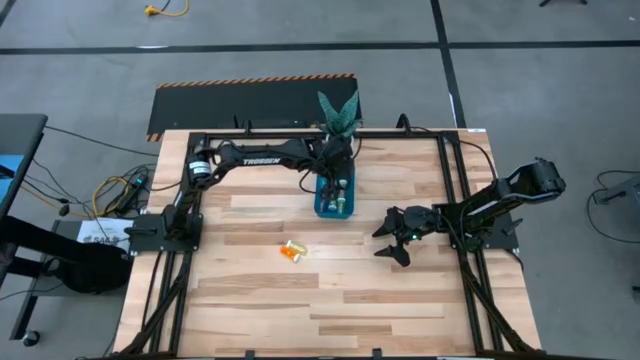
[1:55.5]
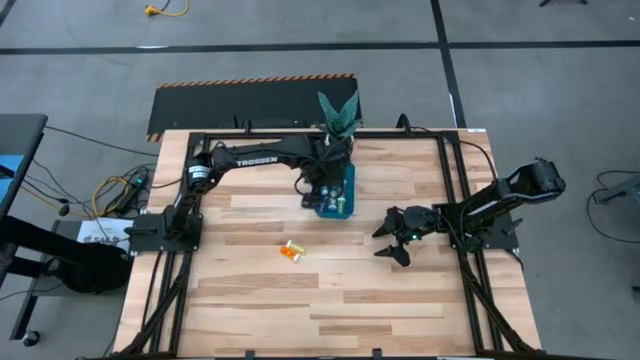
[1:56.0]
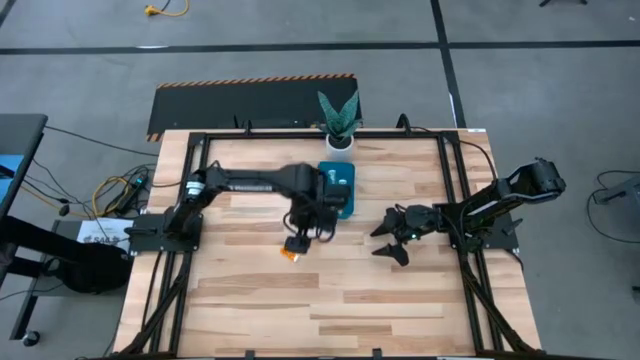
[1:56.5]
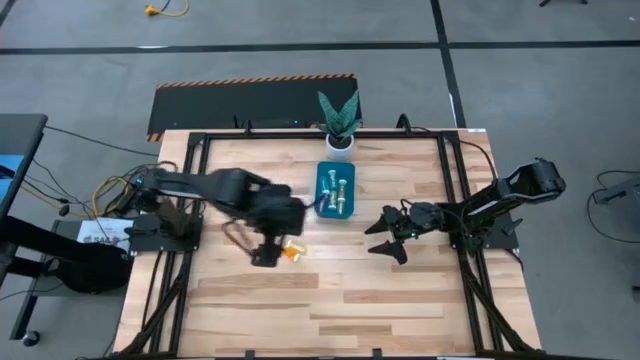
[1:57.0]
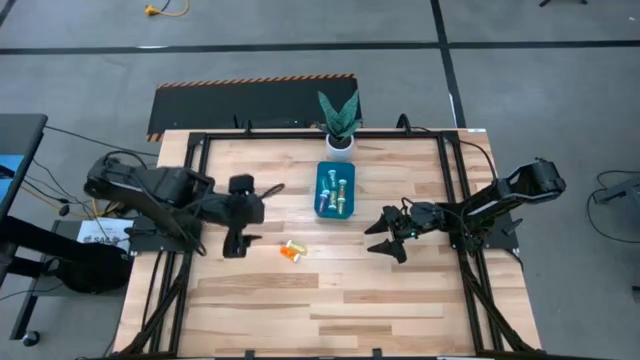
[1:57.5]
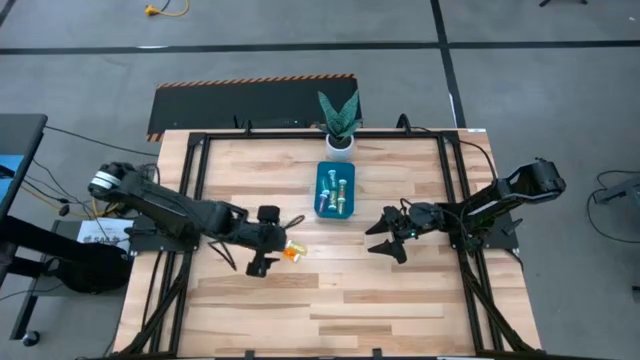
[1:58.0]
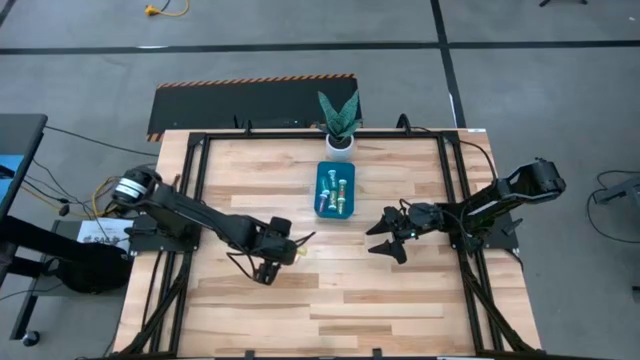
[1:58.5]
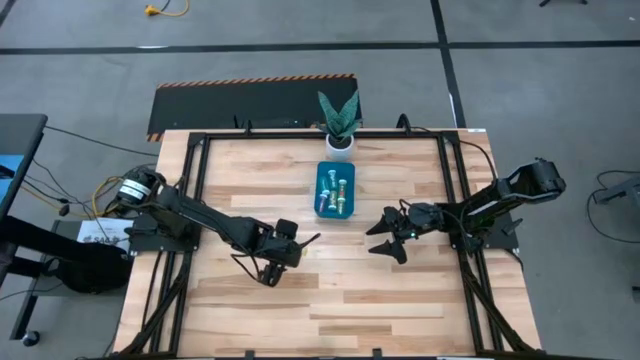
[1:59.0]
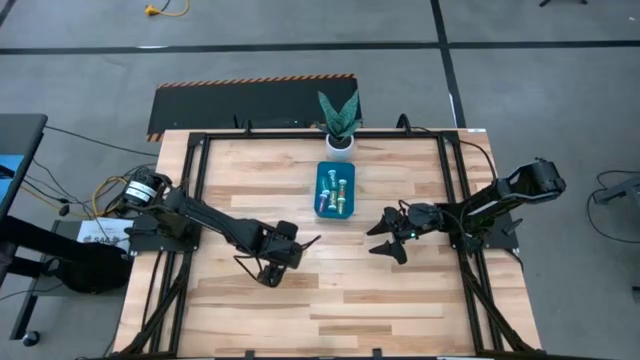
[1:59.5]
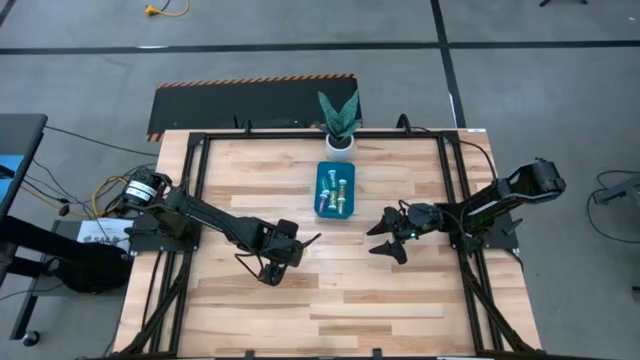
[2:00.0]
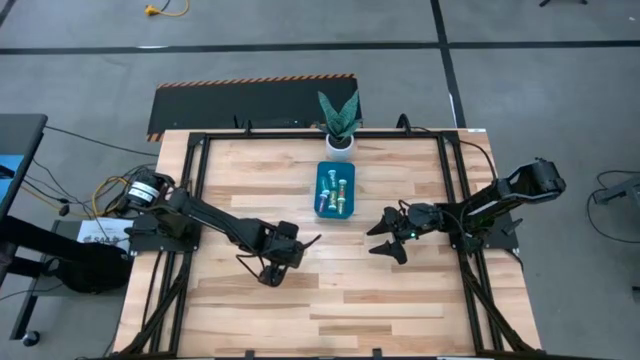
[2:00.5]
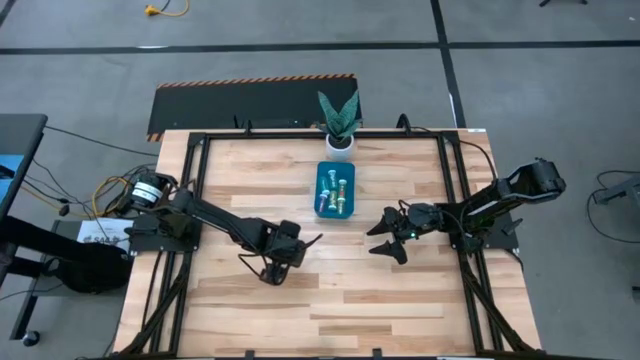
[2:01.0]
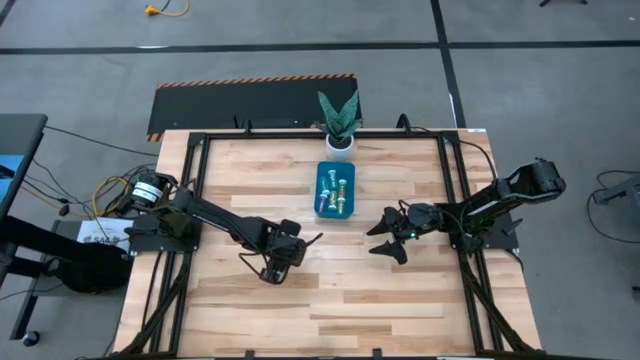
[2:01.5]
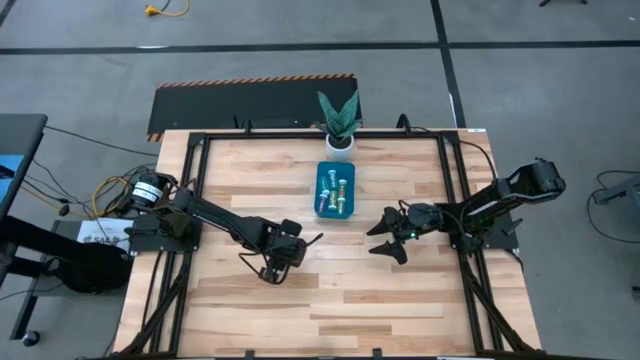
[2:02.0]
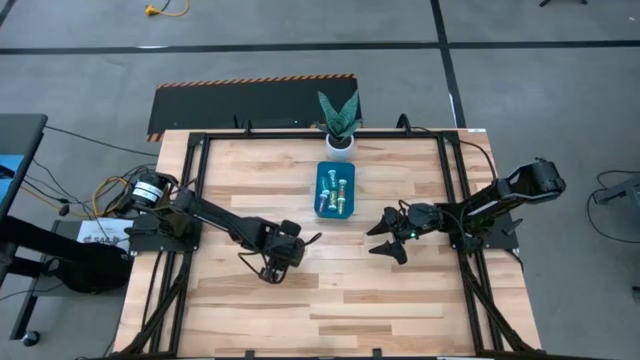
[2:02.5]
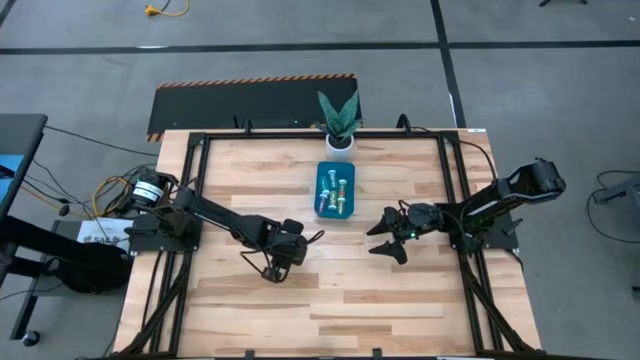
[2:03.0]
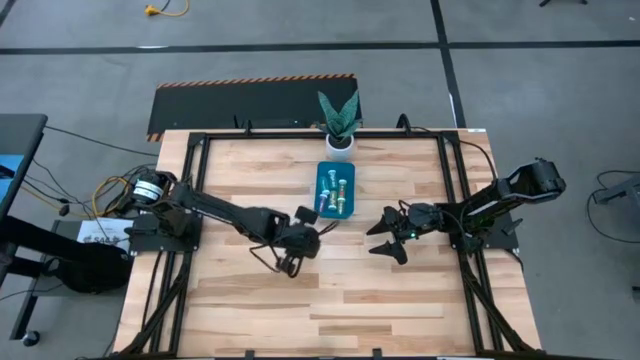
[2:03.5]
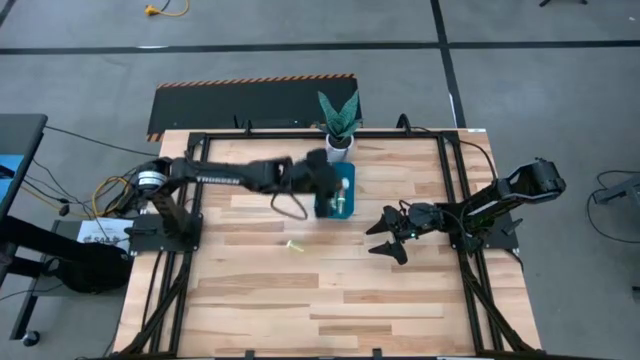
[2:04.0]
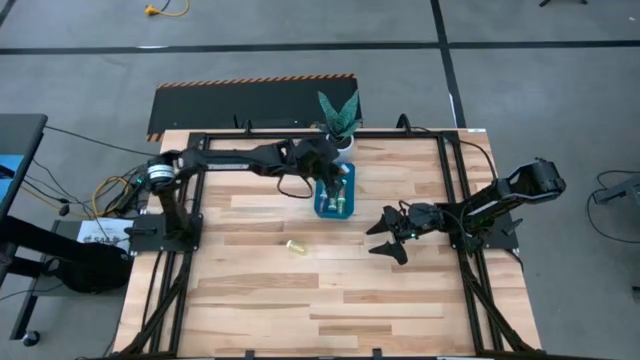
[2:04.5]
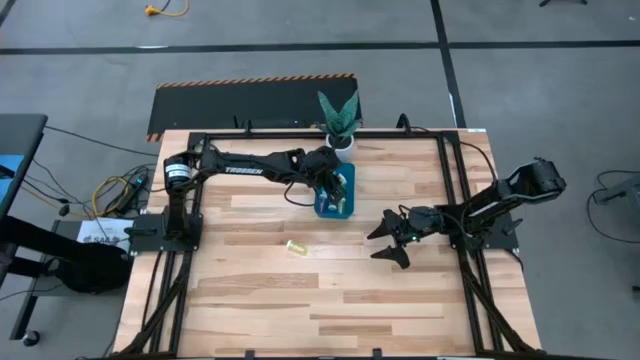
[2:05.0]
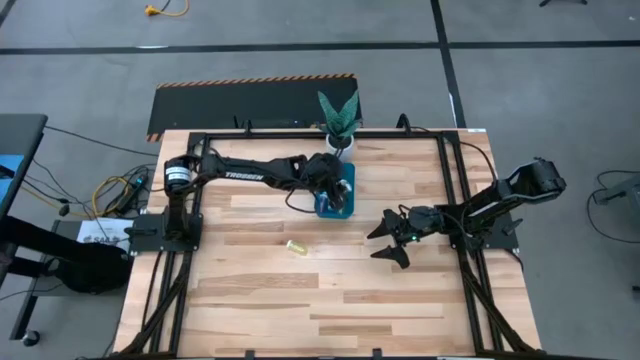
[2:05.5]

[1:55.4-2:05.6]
Task: Pick and place pill bottles into a basket
Put the orange pill bottle into the bin

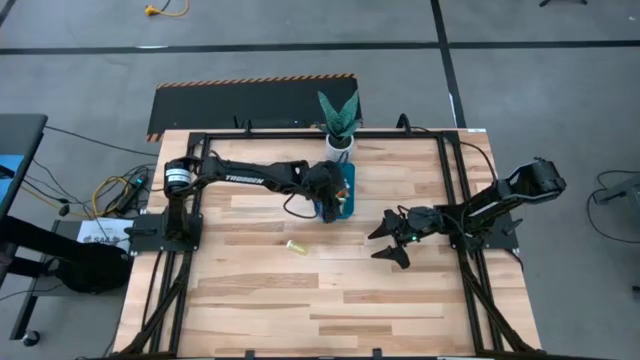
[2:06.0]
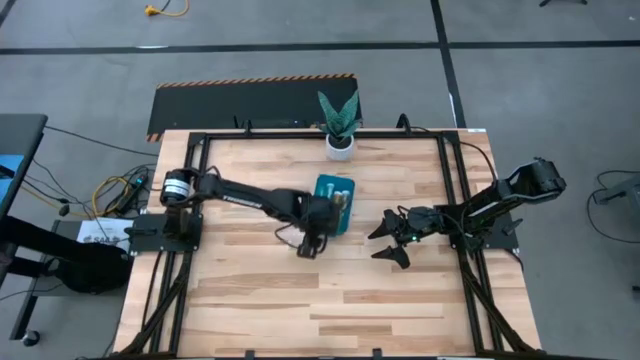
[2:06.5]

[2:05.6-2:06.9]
Move the bin to the center of the table

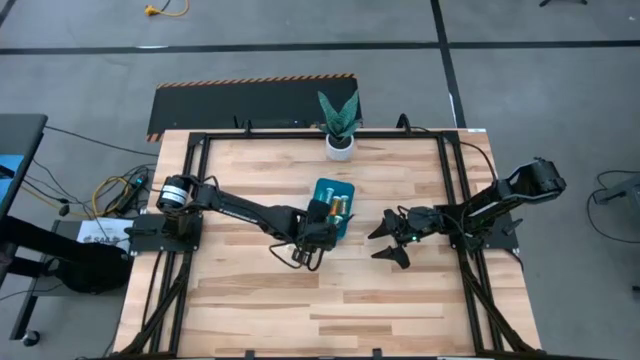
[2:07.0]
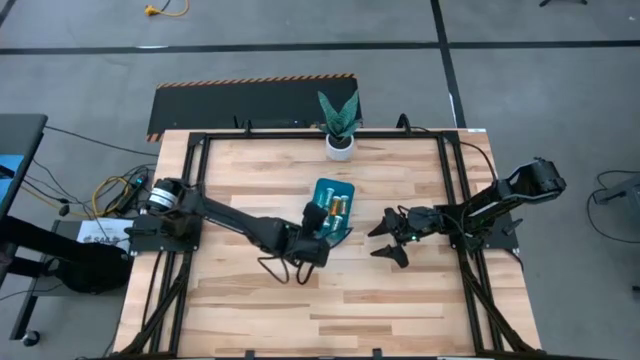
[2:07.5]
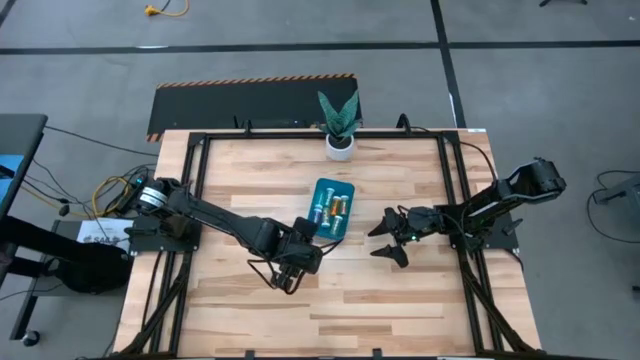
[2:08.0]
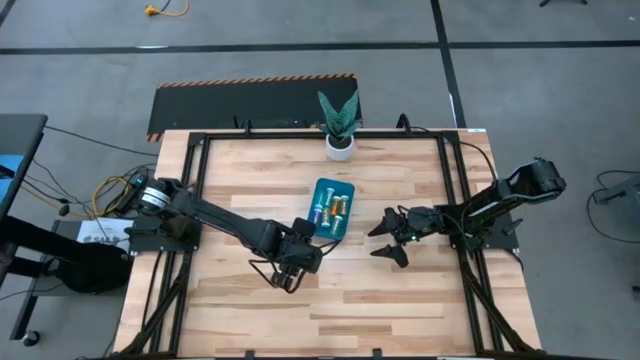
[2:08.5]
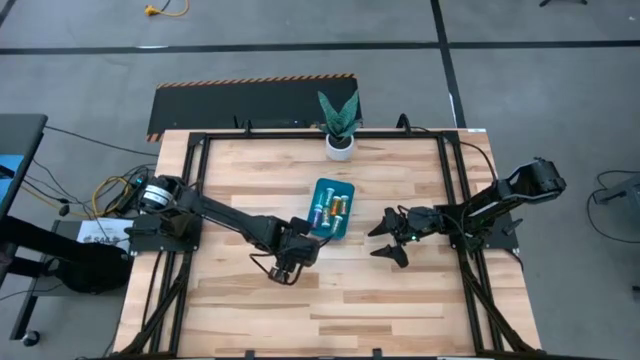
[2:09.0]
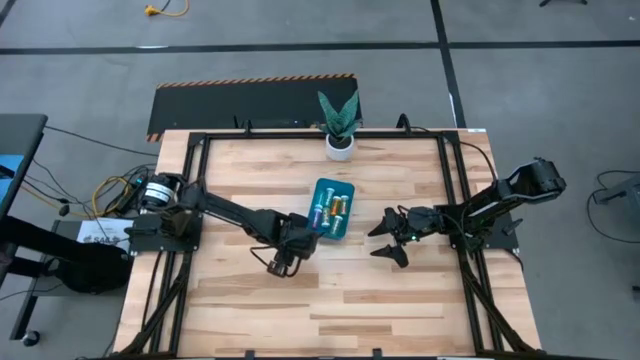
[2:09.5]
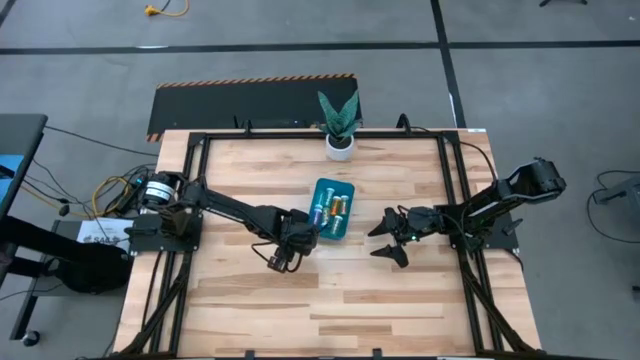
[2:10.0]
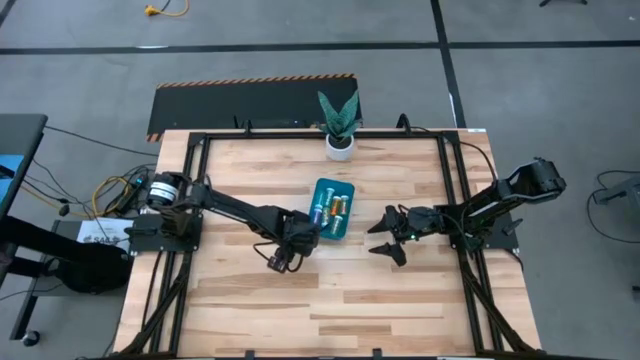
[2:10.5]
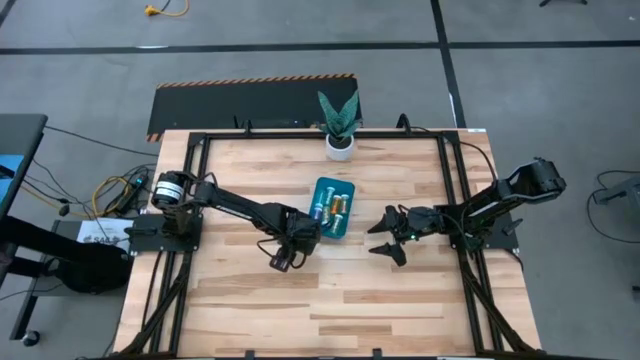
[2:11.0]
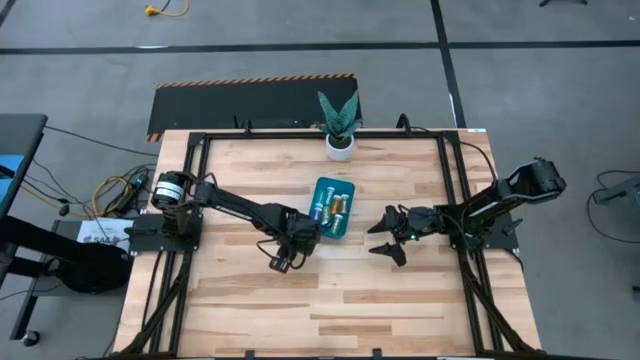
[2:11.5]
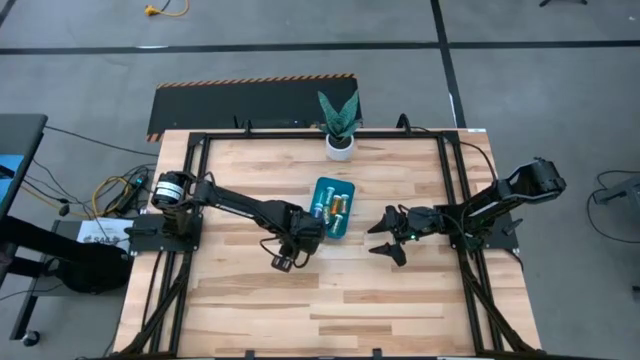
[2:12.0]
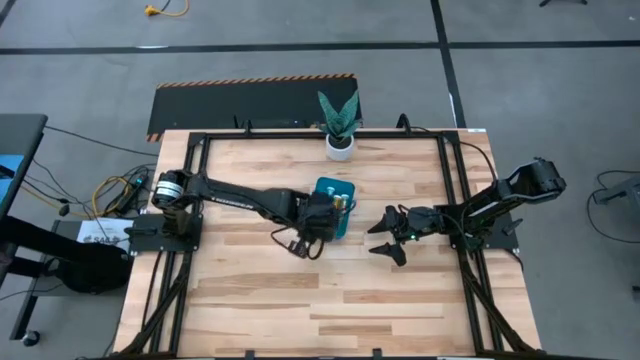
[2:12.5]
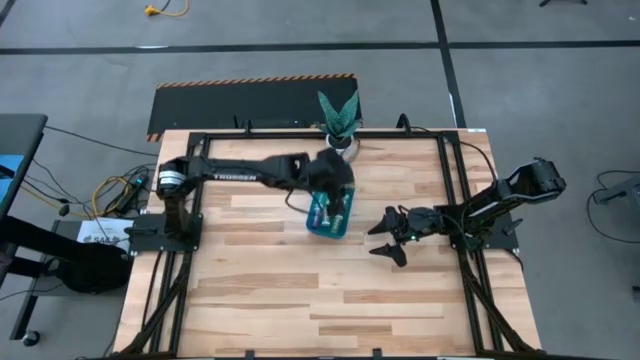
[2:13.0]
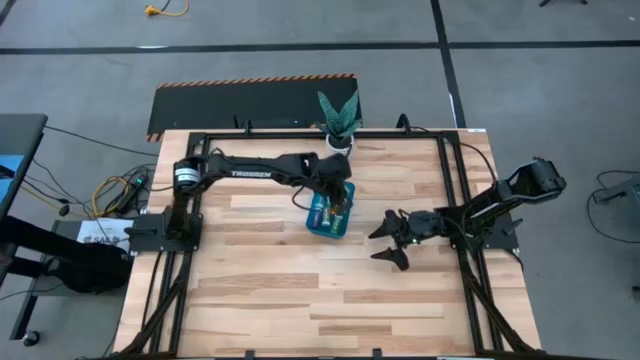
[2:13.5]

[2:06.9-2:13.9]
Put the yellow pill bottle into the bin

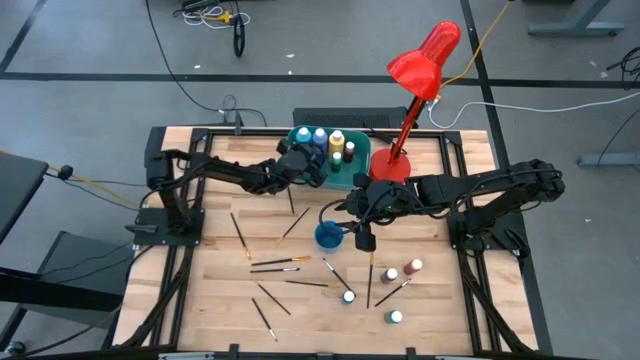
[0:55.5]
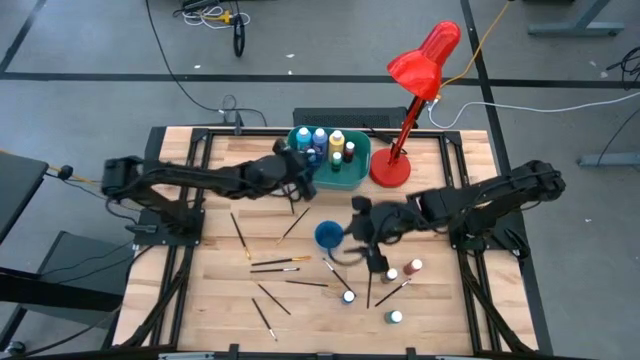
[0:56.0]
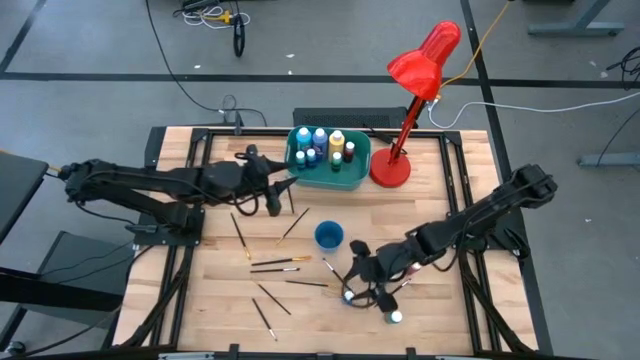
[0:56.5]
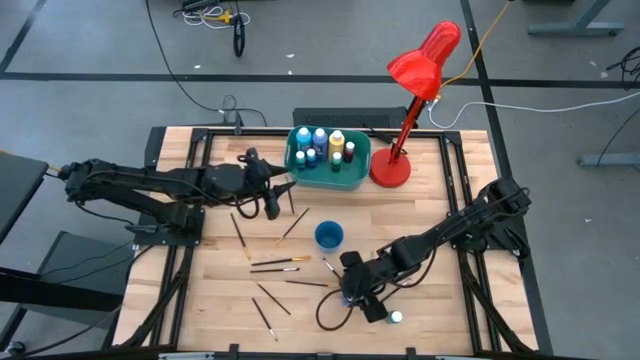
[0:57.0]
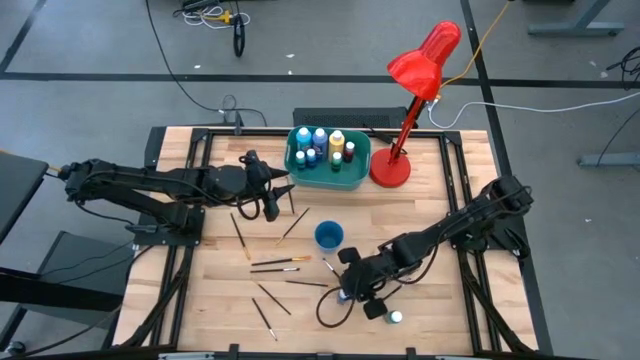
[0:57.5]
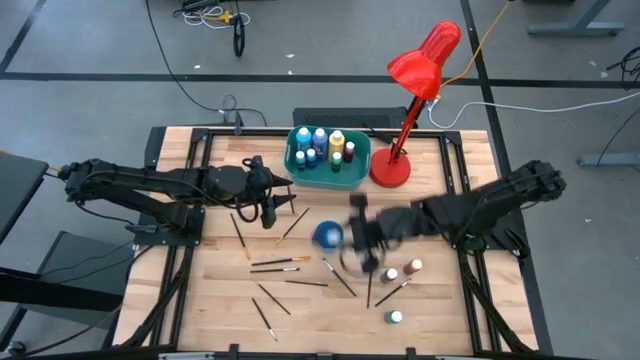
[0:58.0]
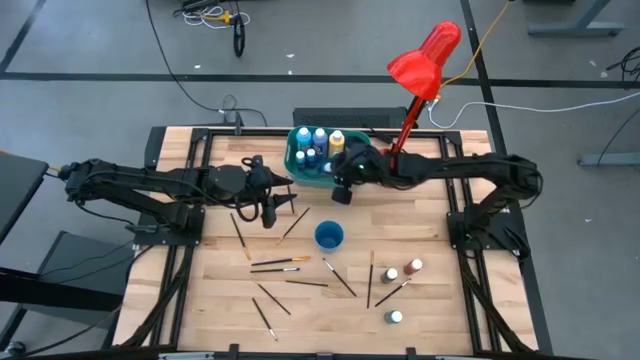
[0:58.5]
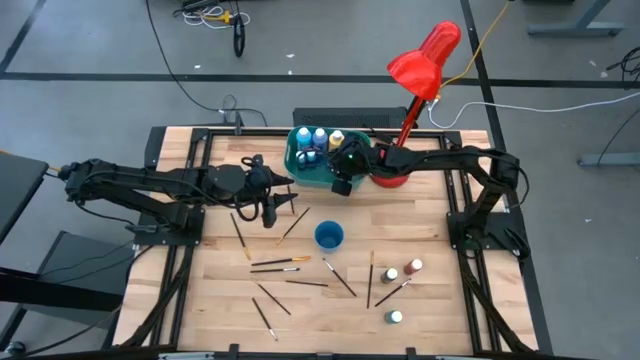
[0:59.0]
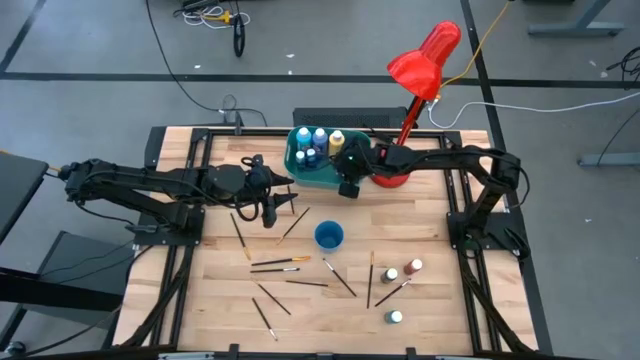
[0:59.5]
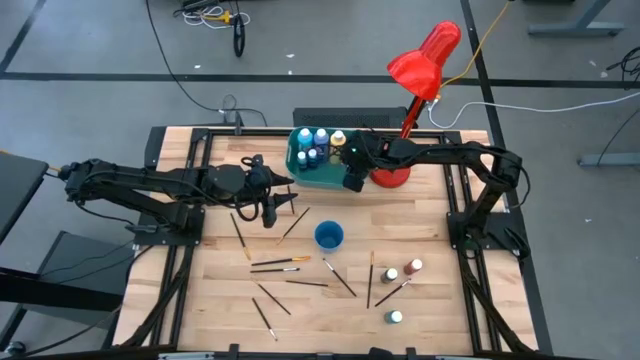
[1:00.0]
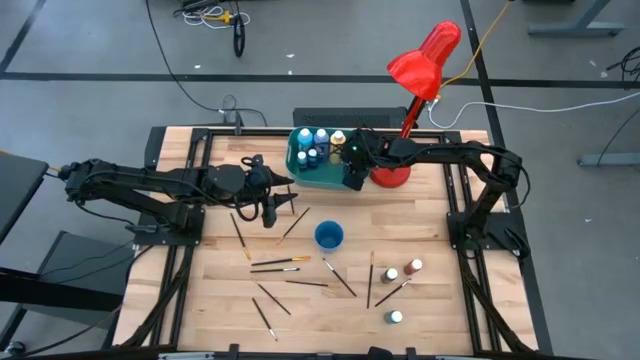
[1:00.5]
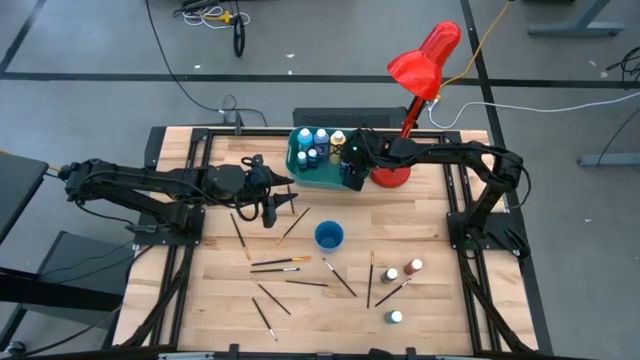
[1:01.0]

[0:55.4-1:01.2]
Task: Pick & Place Paint Supplies
Put the blue paint bottle into the green bin
